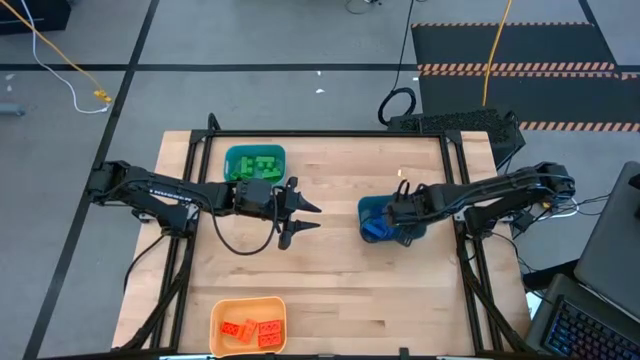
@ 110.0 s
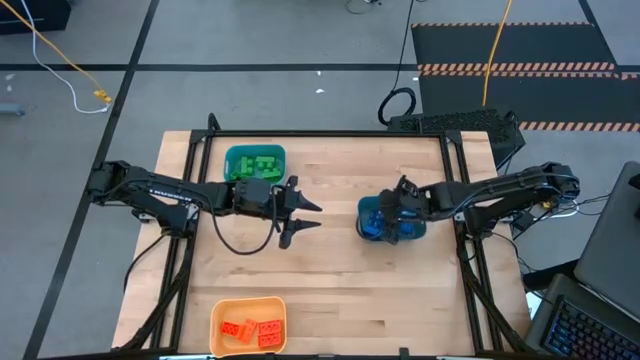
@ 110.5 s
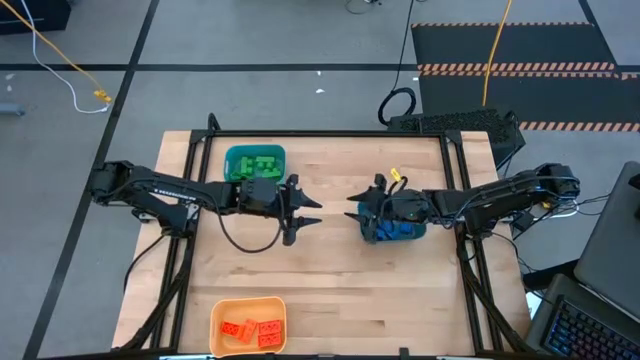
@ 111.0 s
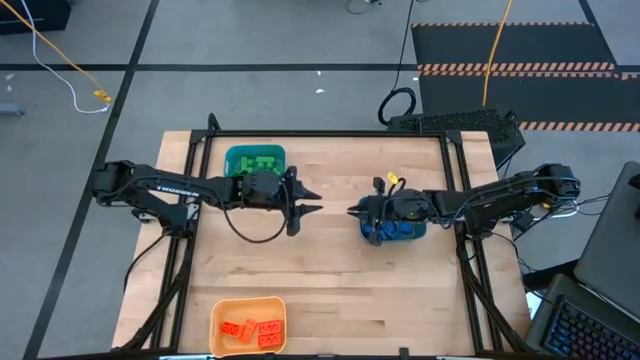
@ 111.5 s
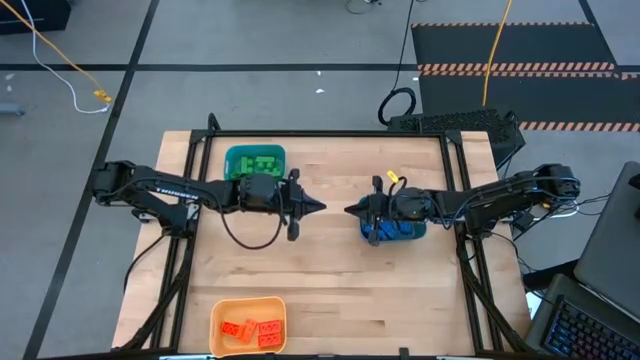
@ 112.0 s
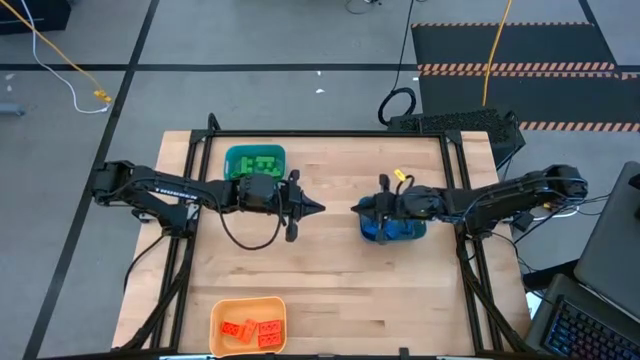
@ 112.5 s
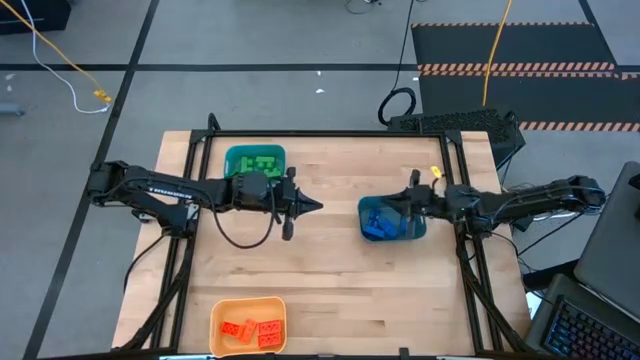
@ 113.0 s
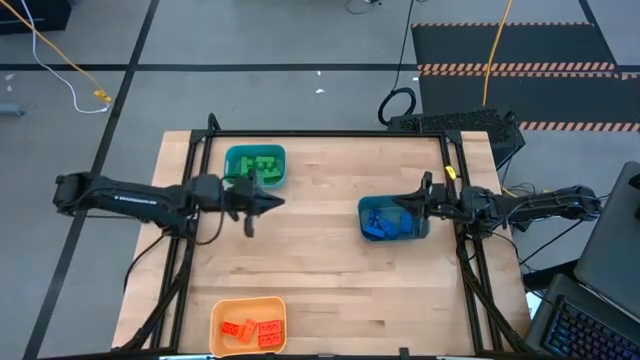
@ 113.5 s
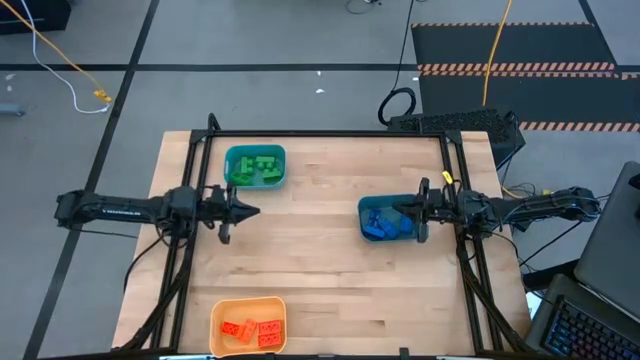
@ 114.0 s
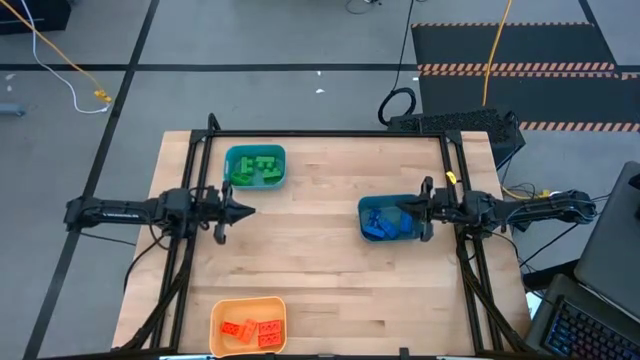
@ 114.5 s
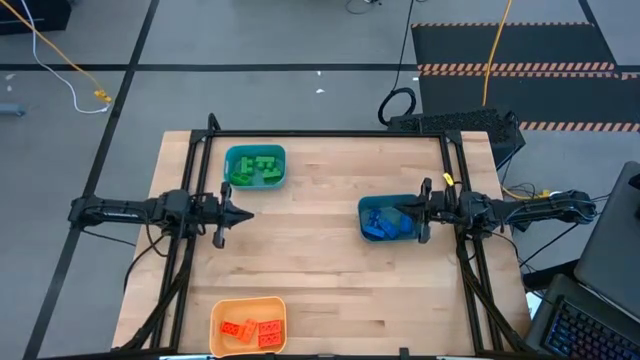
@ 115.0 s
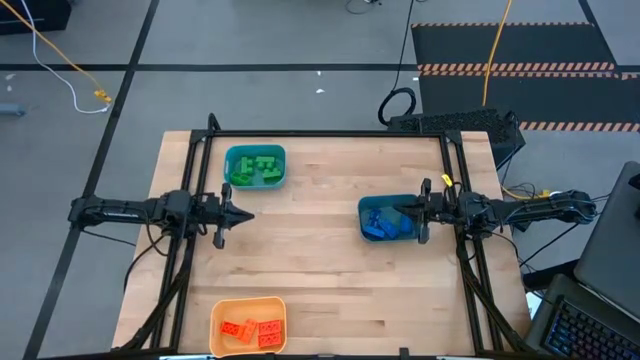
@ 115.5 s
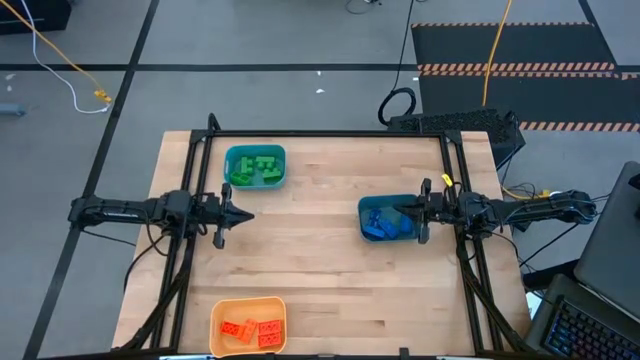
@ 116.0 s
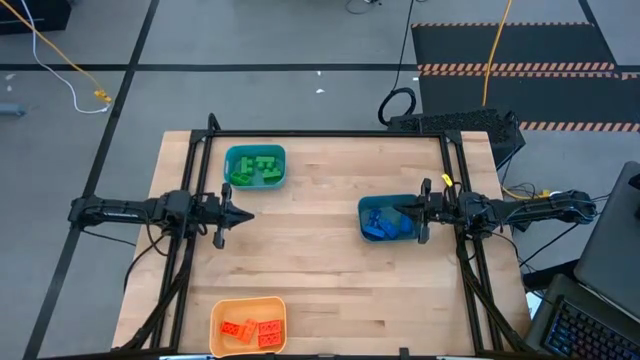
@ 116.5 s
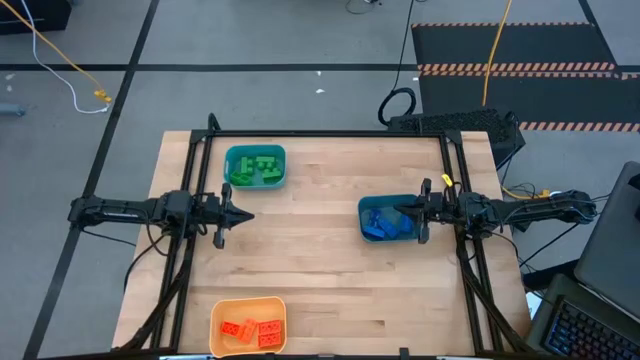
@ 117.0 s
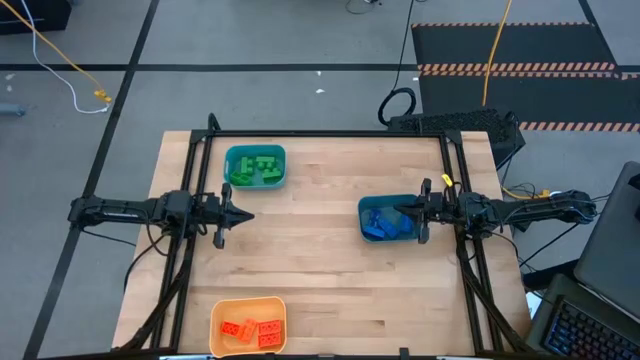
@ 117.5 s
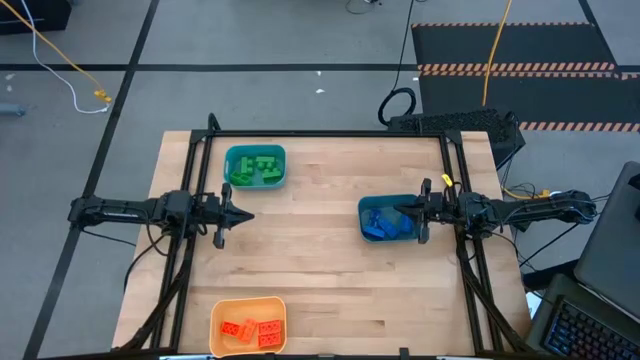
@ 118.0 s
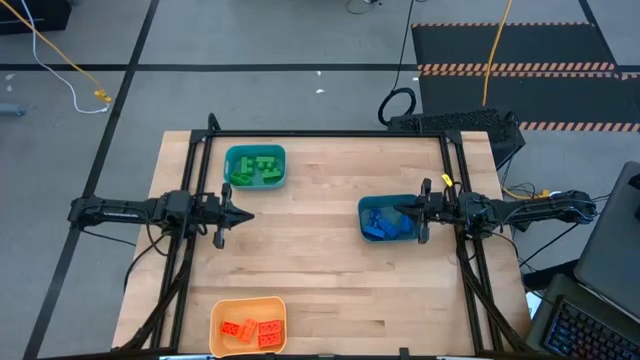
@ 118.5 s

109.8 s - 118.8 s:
Task: Sort & place blocks by color
Return to Home Position

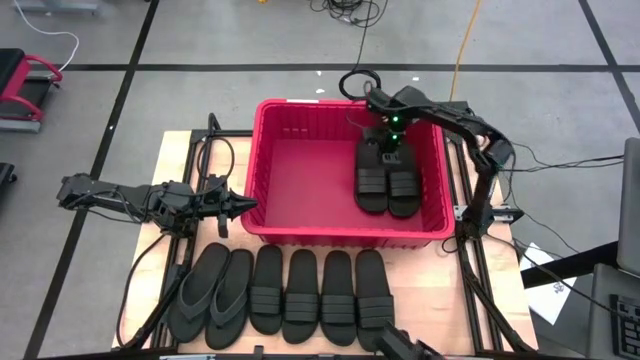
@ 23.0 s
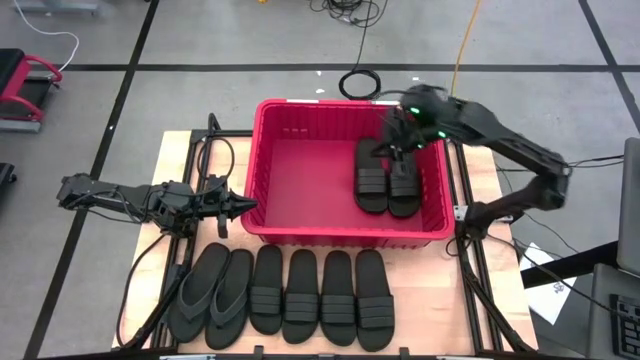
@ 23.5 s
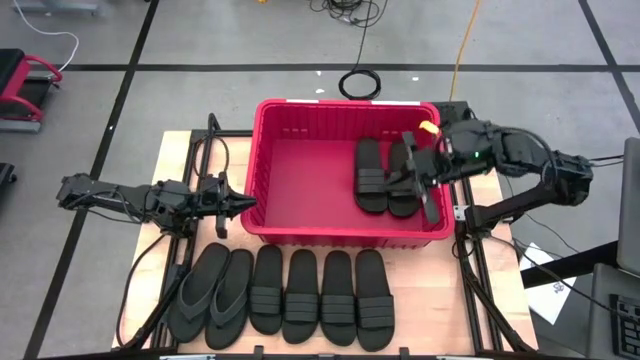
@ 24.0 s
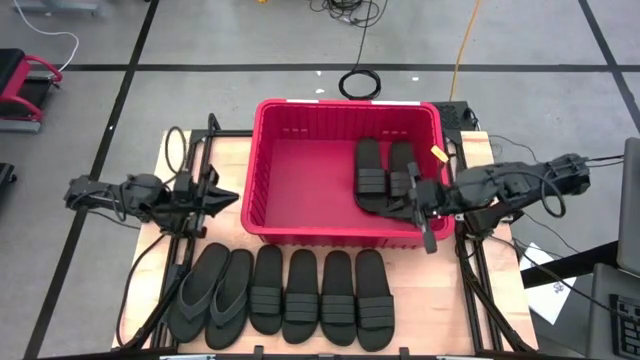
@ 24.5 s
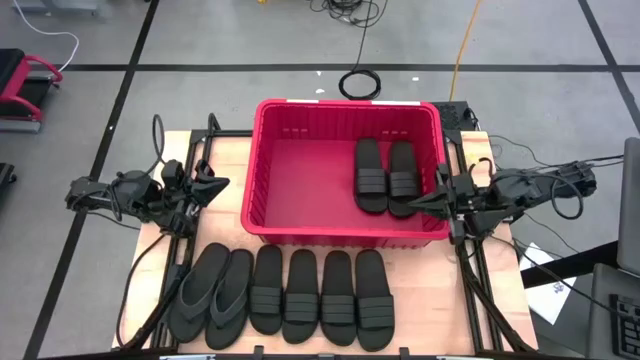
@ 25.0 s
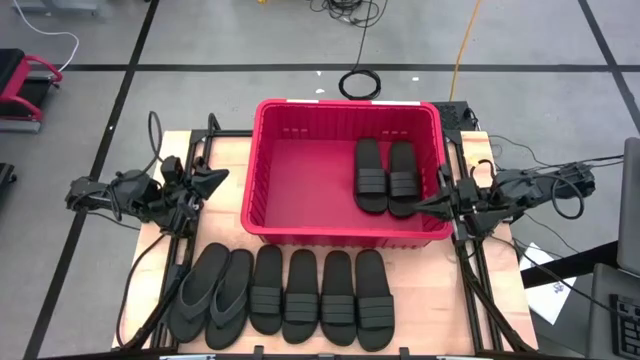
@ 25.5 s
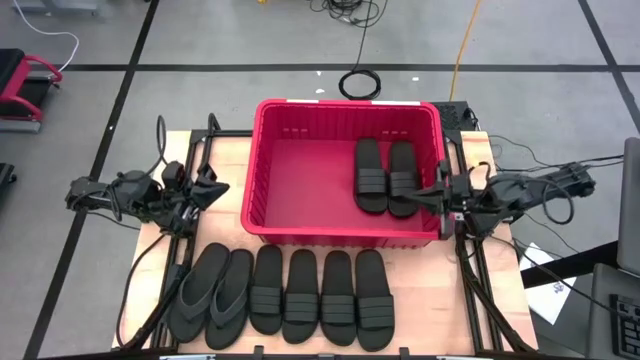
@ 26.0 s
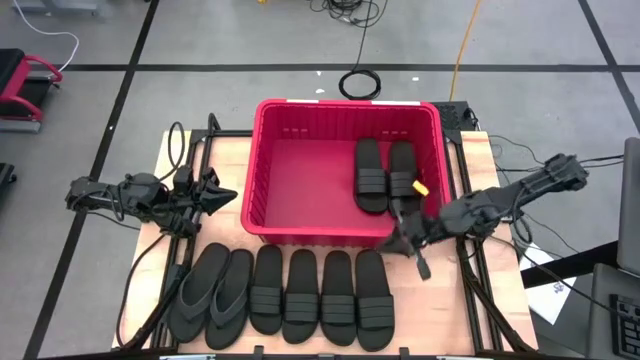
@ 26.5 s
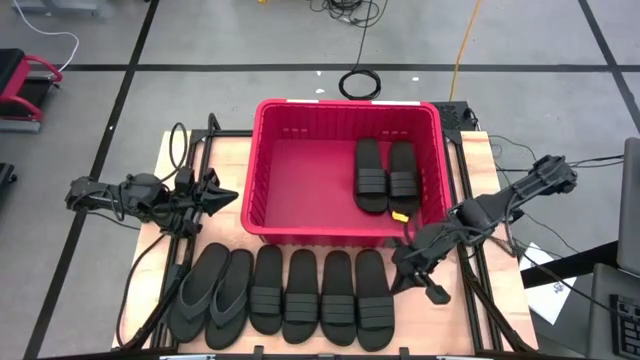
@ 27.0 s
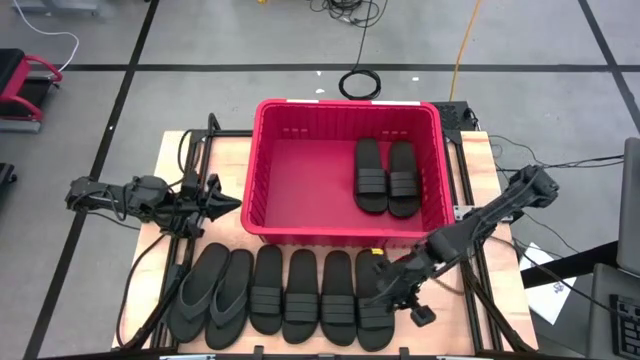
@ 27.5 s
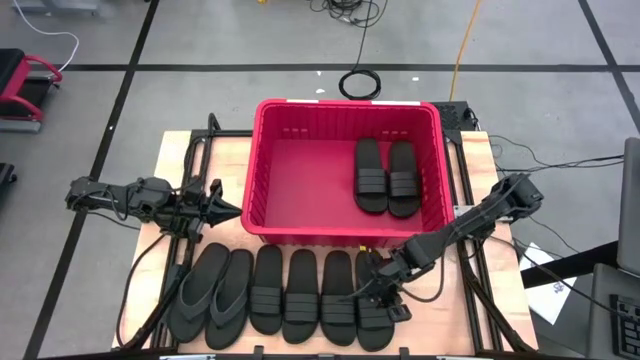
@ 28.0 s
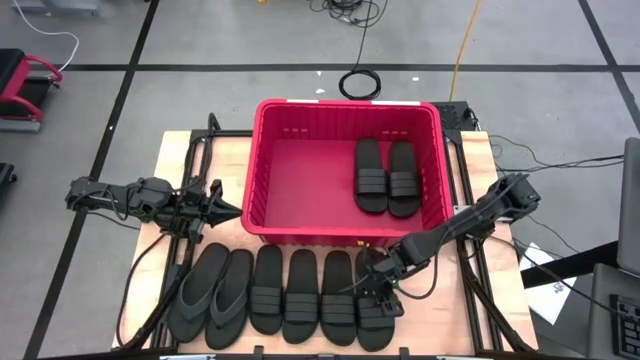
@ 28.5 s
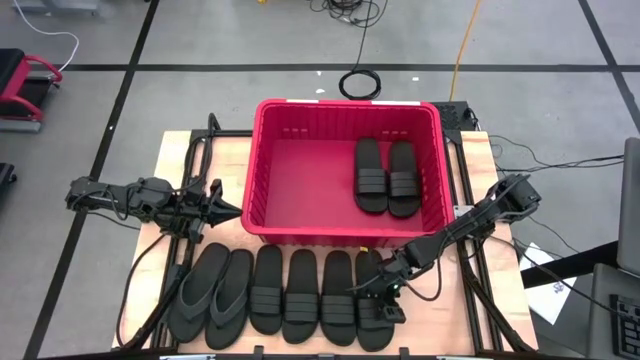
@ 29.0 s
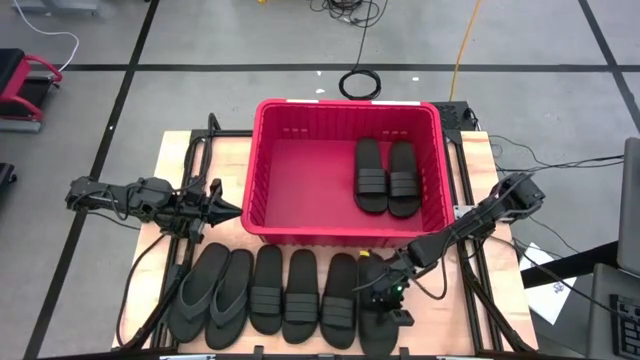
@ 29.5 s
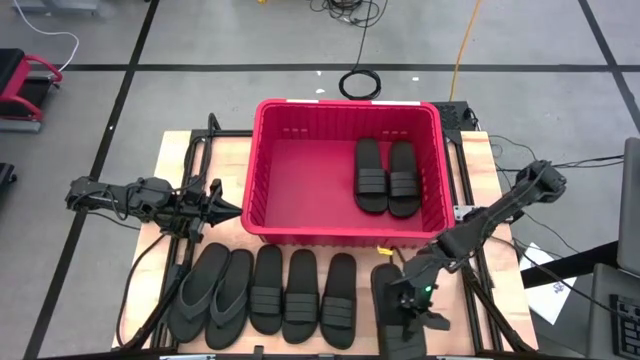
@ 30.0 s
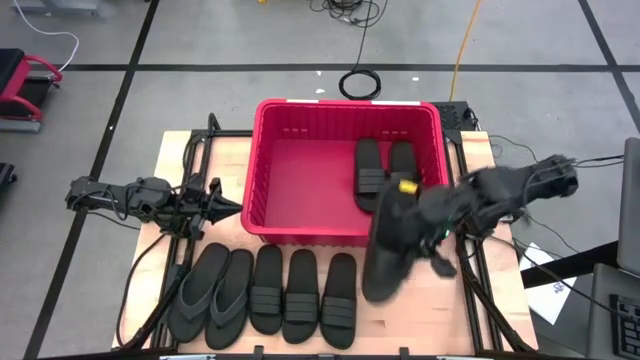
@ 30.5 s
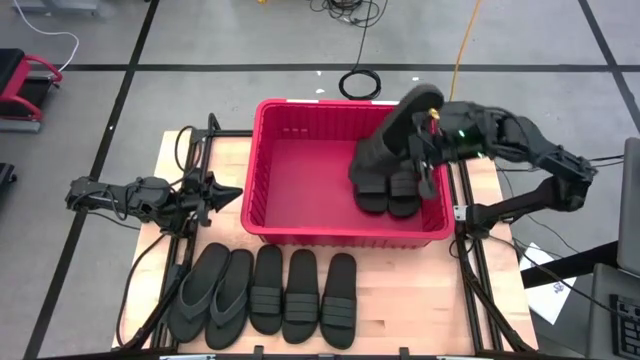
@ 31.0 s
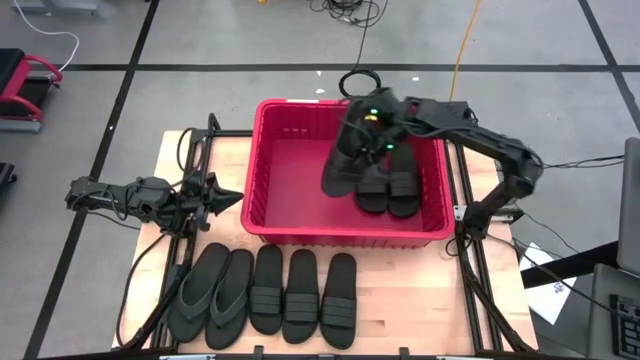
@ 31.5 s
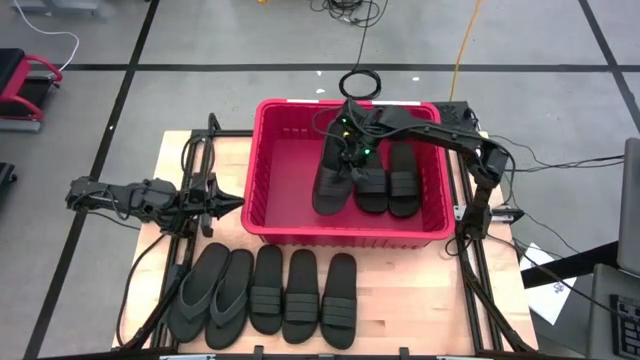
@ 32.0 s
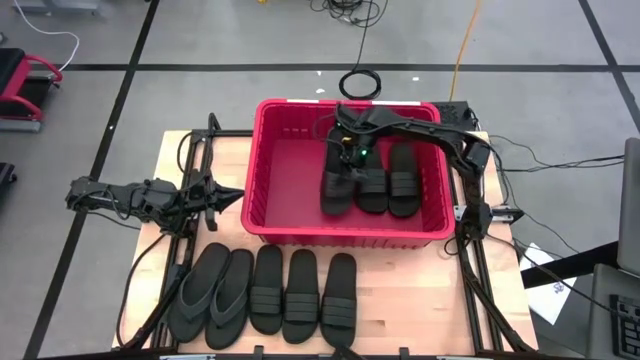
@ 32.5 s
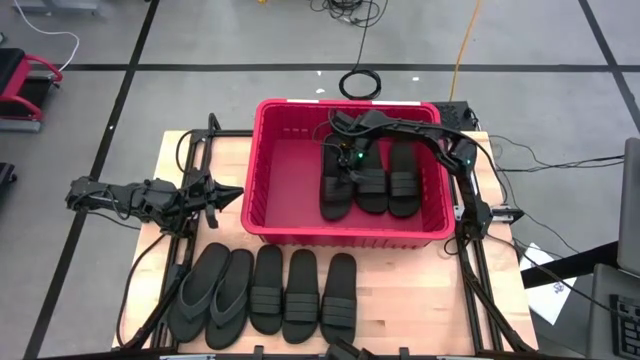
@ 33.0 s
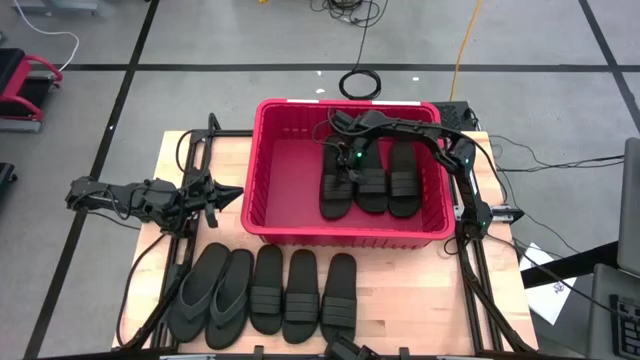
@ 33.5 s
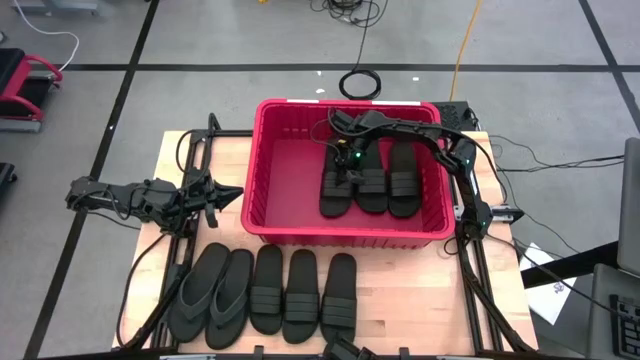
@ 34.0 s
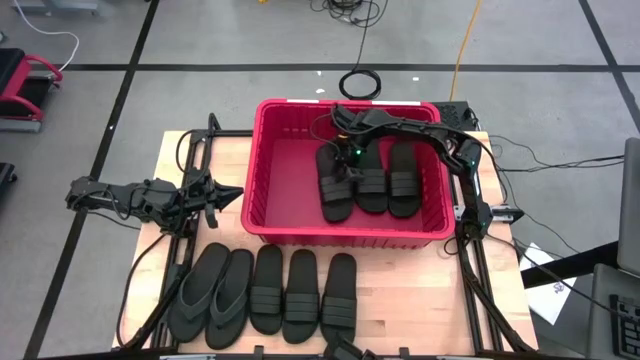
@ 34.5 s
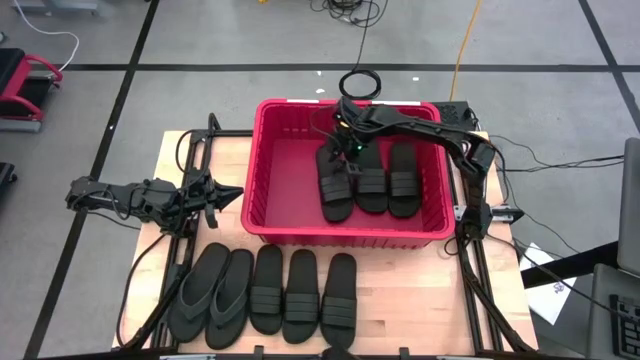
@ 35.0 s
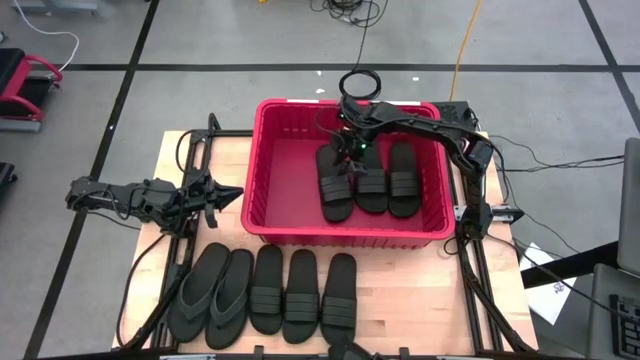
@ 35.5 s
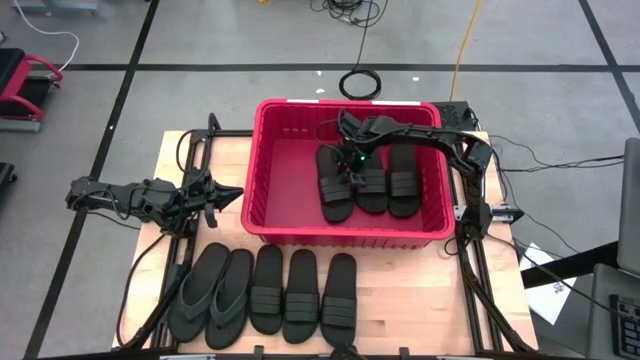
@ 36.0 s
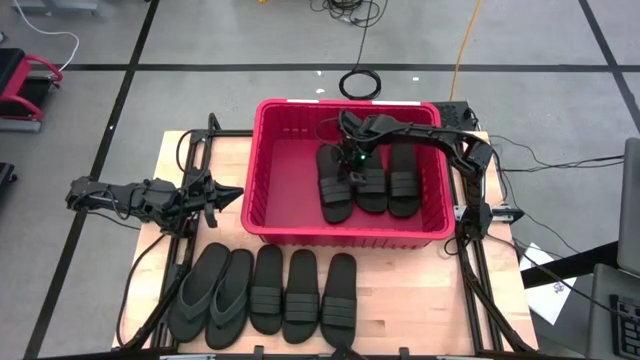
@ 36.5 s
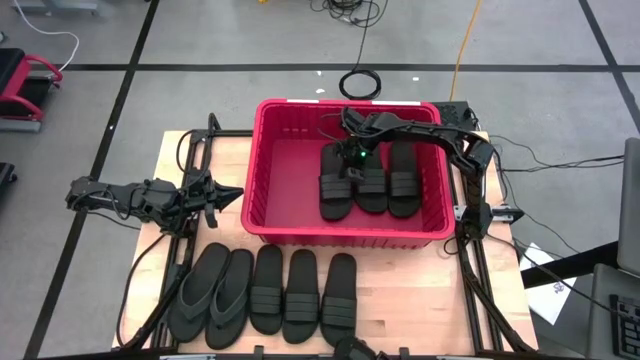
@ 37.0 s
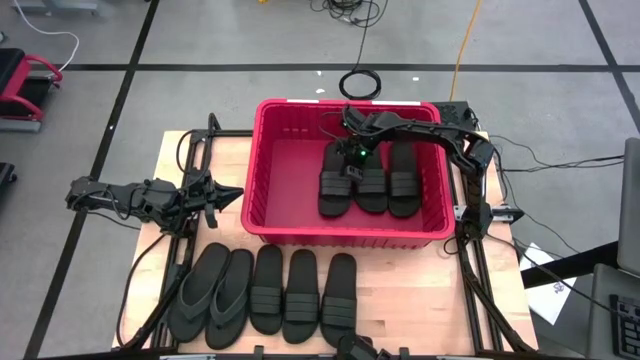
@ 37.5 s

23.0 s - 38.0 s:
Task: Pick and place slides into bin
Put the black slipper into the red organizer bin
